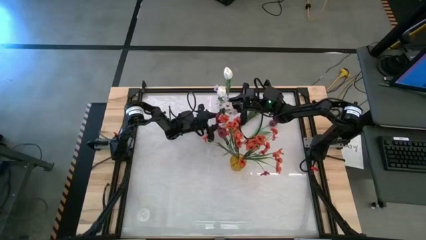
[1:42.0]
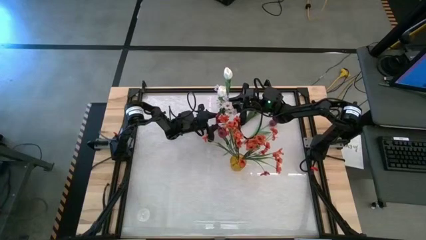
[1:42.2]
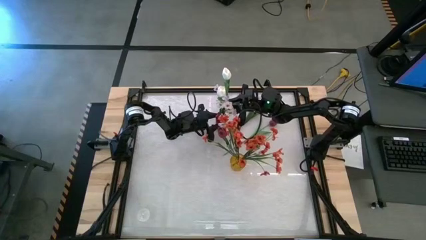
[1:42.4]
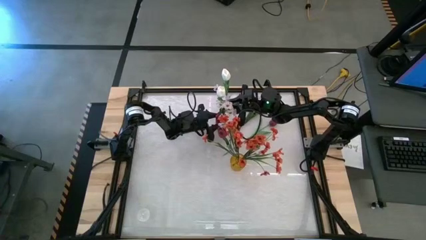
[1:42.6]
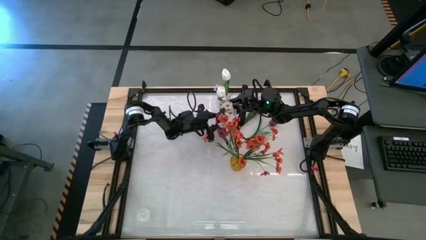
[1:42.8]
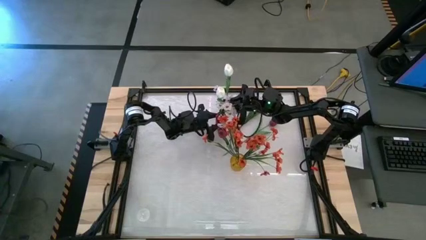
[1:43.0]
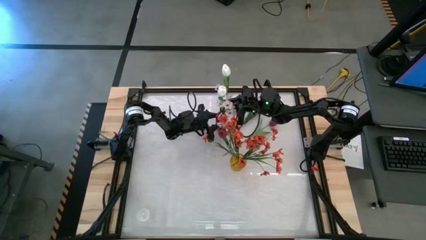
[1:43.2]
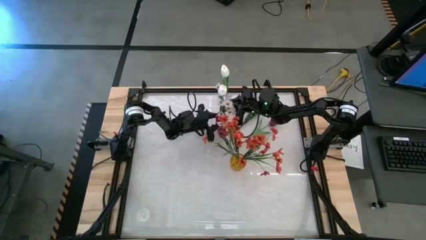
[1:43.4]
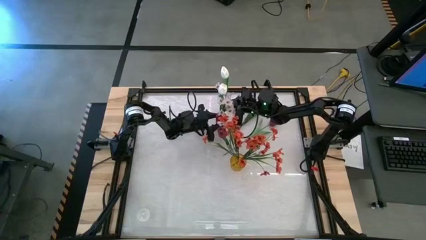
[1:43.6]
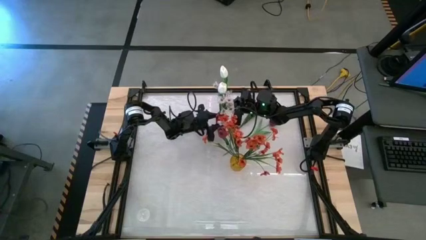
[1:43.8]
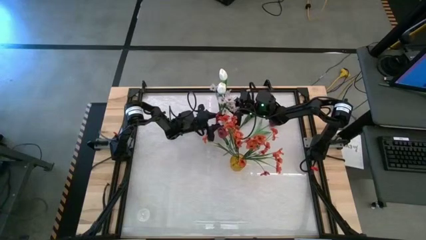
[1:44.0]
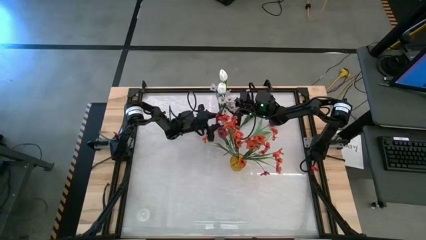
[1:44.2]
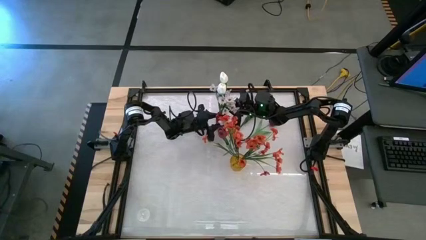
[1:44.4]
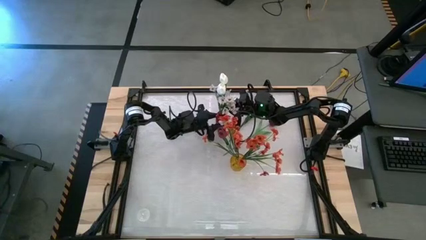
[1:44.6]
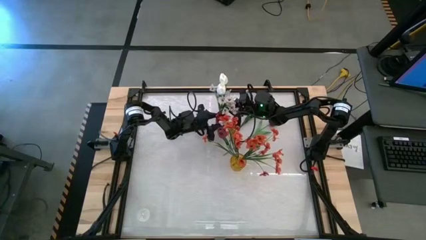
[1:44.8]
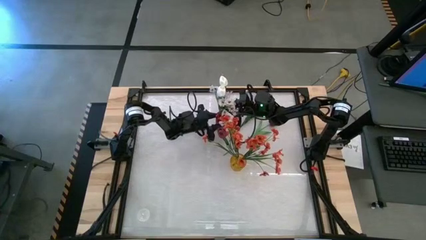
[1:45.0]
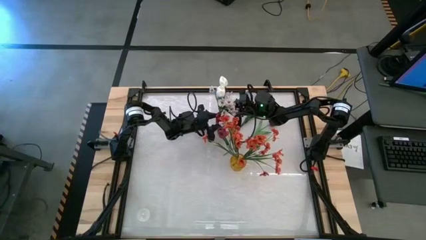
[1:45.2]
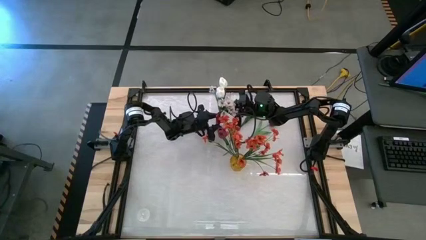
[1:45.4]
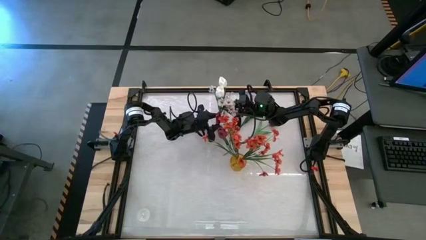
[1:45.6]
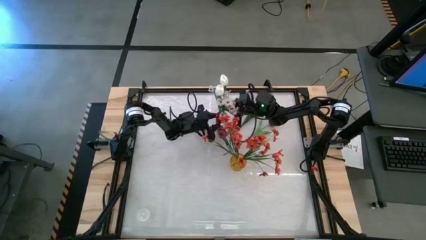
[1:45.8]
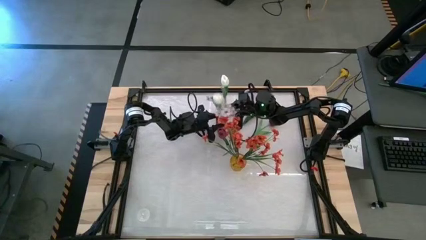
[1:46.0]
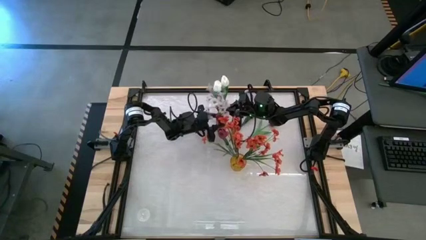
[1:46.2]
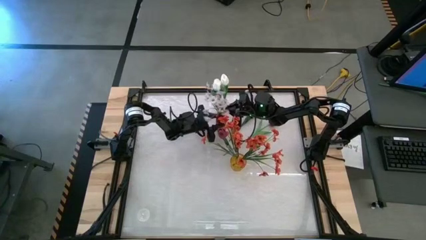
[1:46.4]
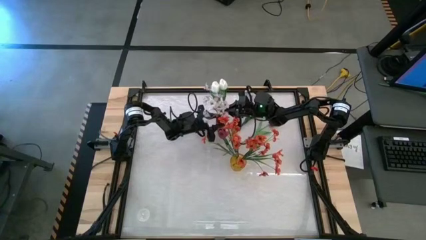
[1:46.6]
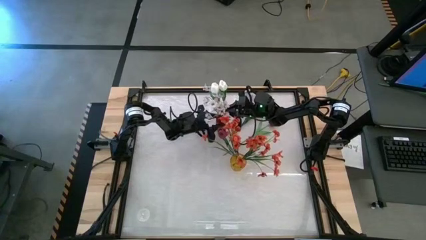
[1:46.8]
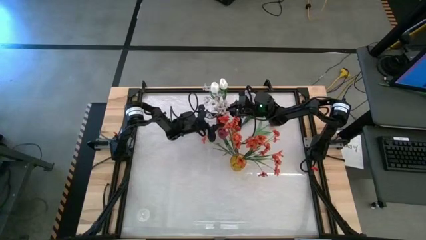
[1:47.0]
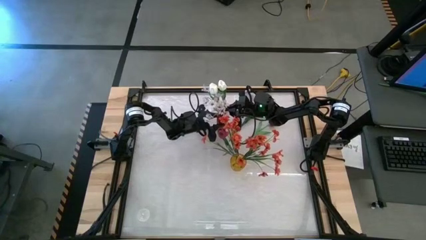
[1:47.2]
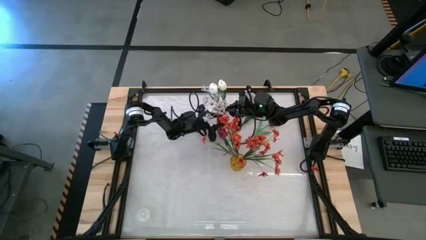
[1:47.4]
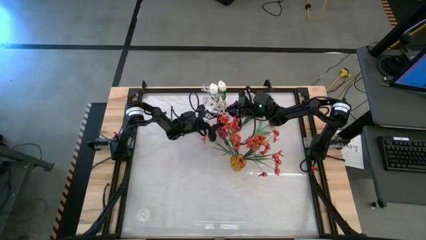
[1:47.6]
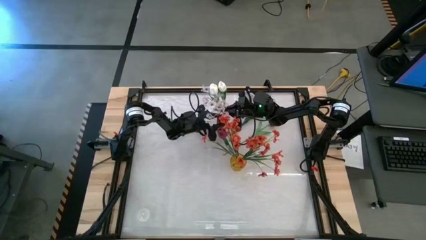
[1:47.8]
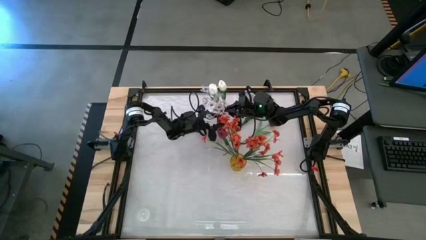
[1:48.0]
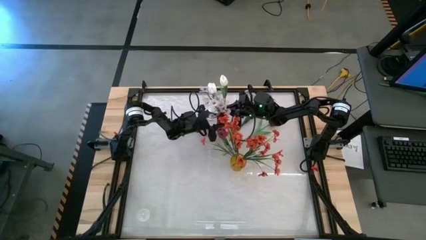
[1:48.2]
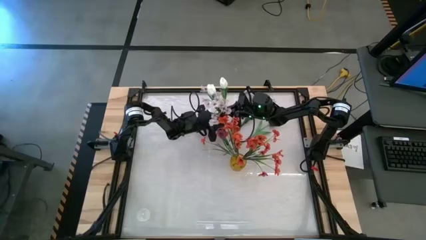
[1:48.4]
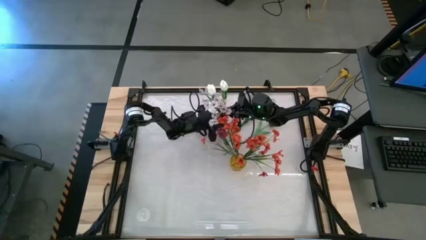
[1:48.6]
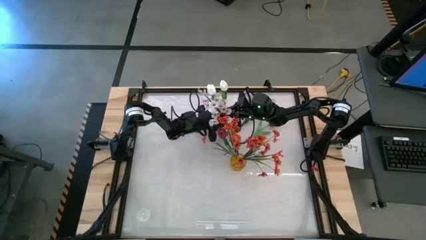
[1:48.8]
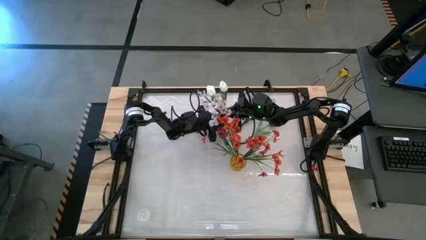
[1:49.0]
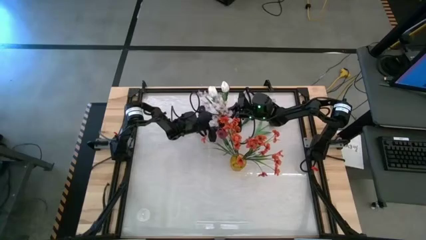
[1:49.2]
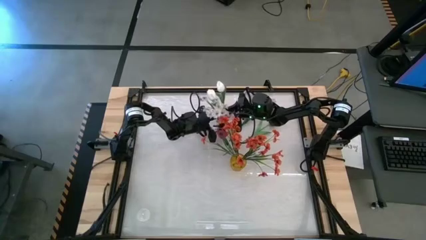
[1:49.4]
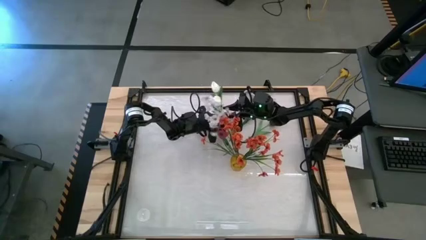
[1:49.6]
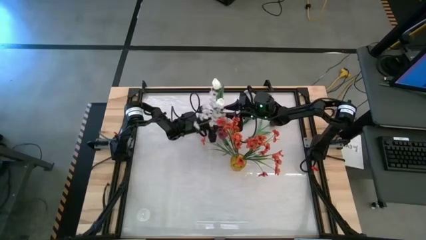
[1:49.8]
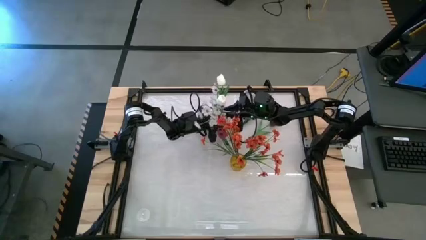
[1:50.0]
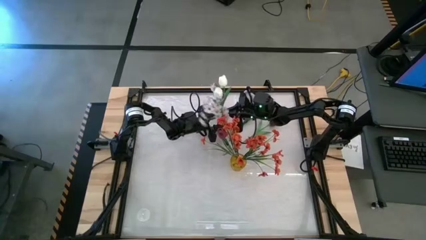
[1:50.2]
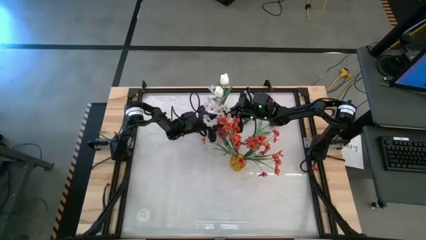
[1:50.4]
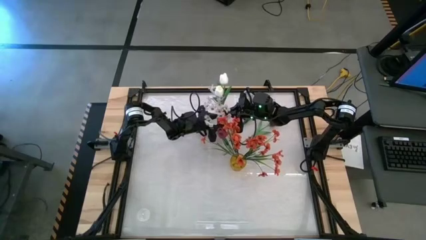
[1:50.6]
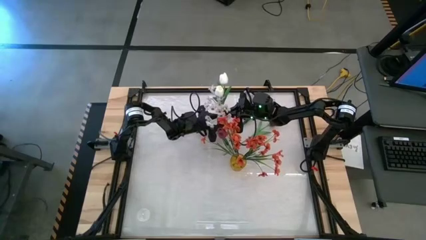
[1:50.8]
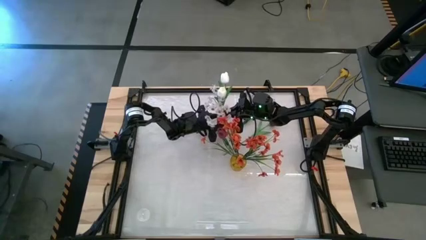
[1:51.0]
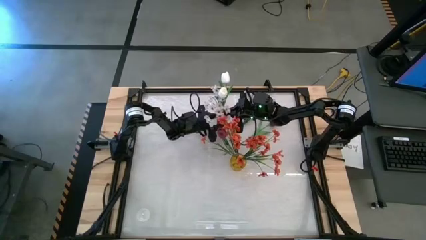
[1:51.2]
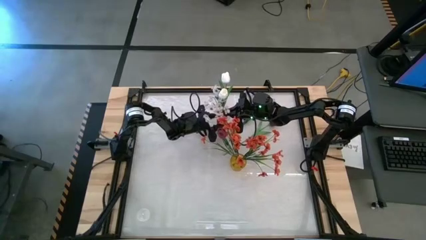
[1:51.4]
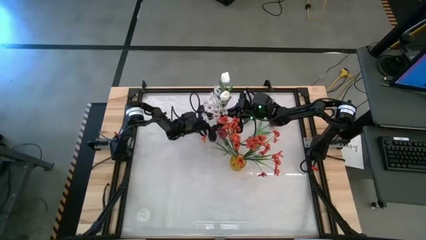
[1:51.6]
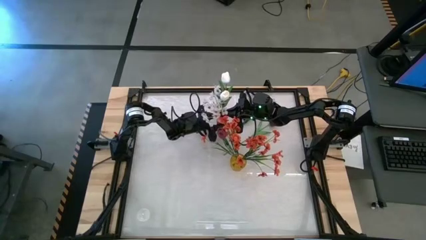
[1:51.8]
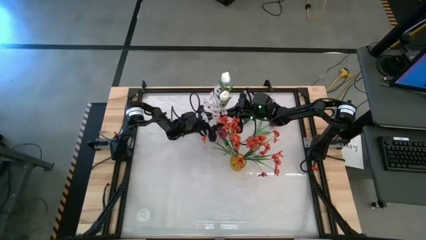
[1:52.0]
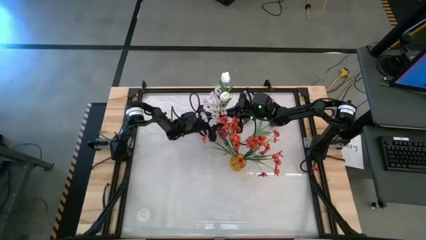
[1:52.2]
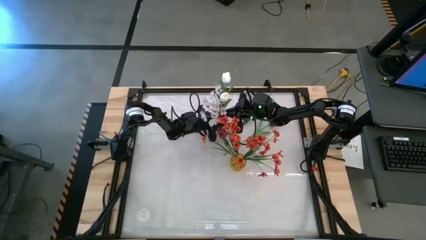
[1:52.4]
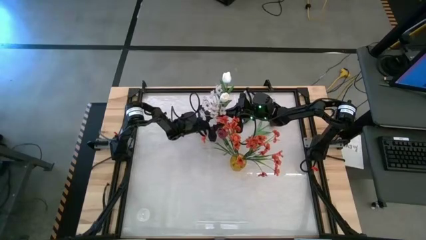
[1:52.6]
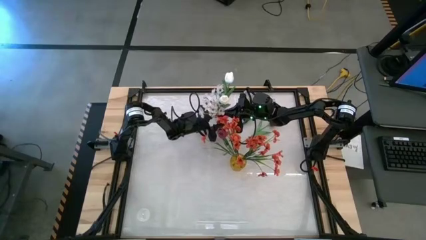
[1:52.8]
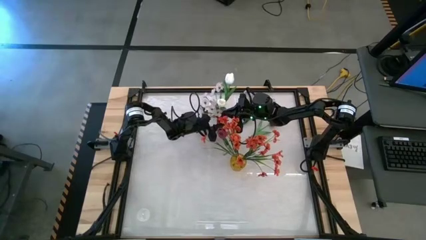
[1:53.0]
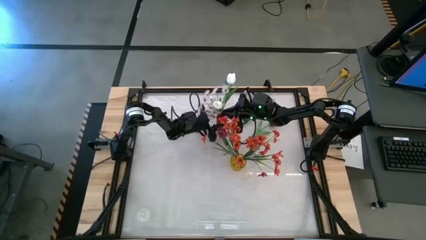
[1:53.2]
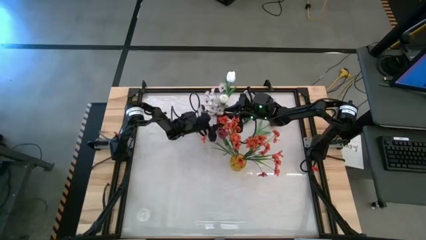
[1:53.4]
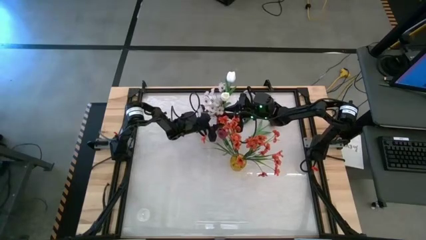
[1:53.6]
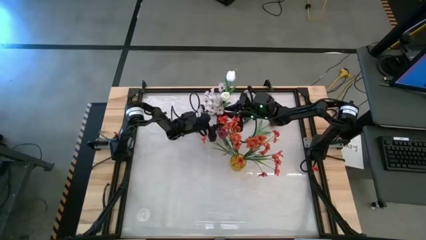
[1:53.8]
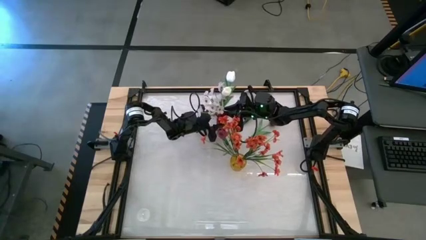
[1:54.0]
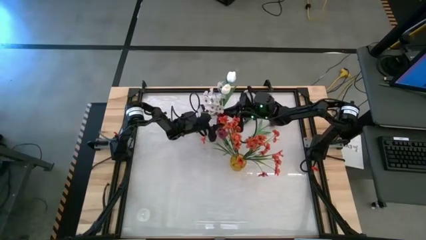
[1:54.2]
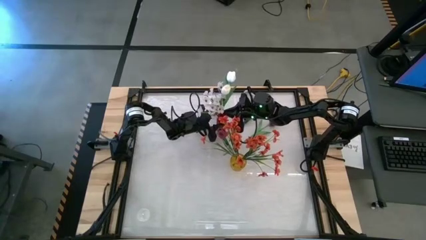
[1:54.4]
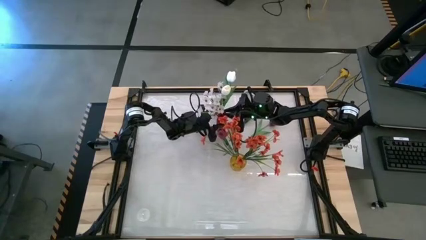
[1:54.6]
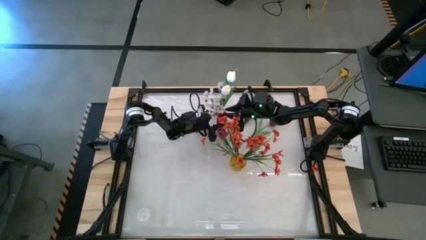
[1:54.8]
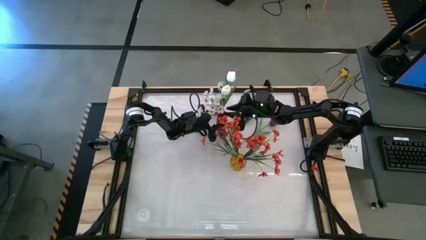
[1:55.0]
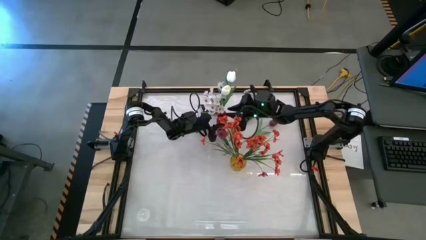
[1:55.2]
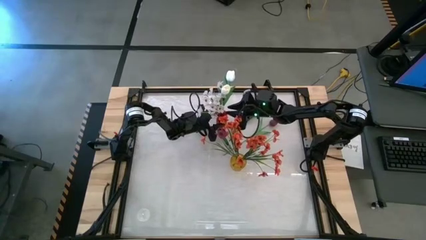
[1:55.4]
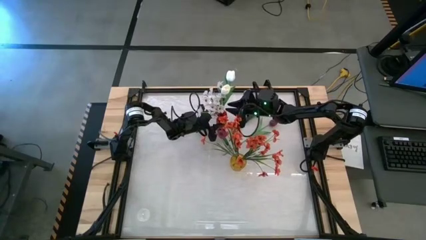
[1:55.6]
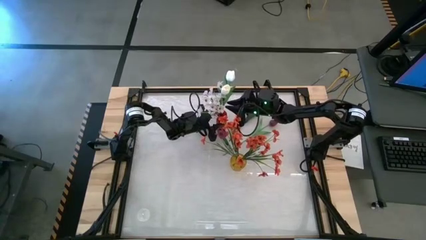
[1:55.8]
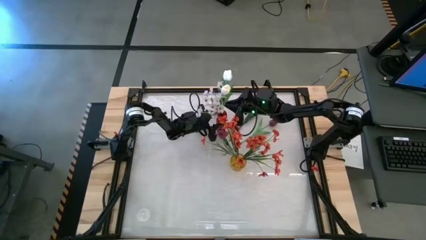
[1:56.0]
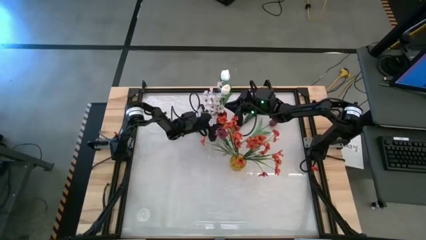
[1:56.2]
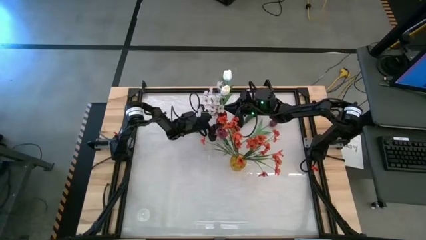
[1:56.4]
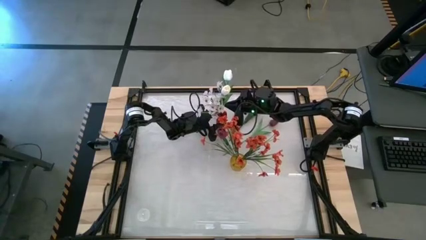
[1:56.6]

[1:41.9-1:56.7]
Task: Sort flowers into vase by color
Put the white flower into the red vase

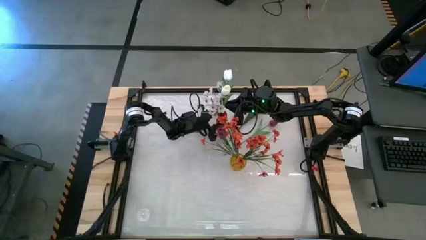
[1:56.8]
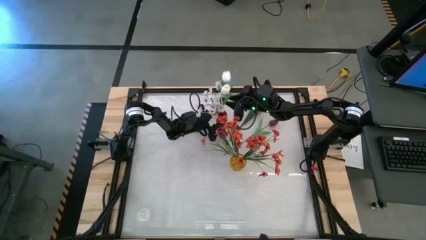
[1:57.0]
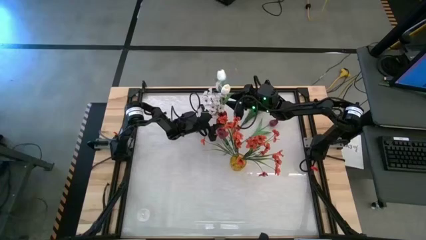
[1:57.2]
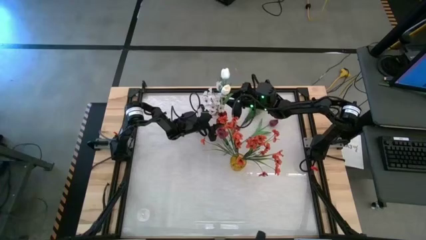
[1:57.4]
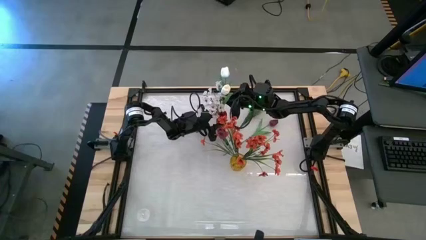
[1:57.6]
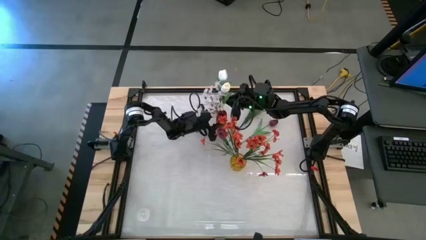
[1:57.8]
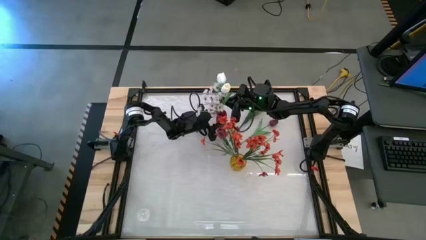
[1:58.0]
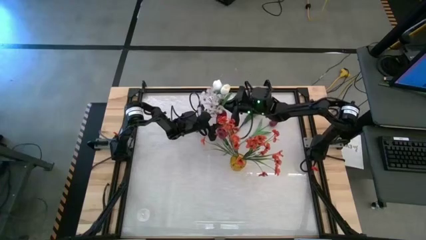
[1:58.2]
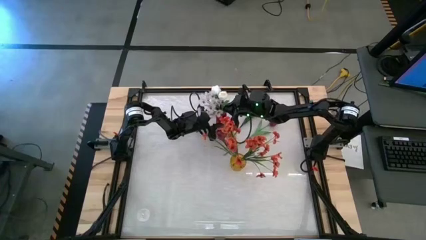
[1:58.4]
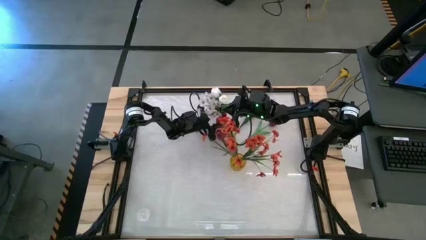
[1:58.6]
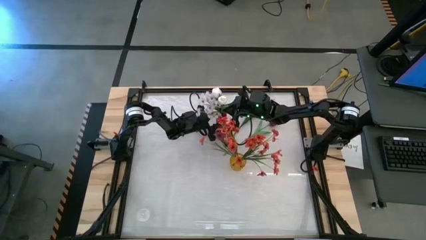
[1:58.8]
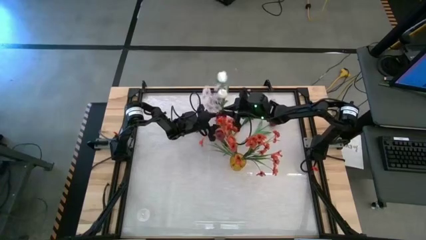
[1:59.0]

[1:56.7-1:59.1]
Put the white flower into the red vase
